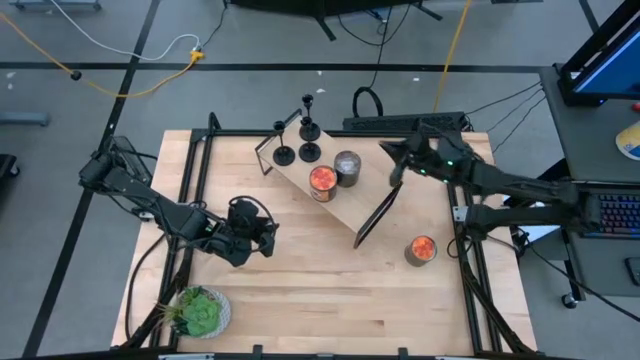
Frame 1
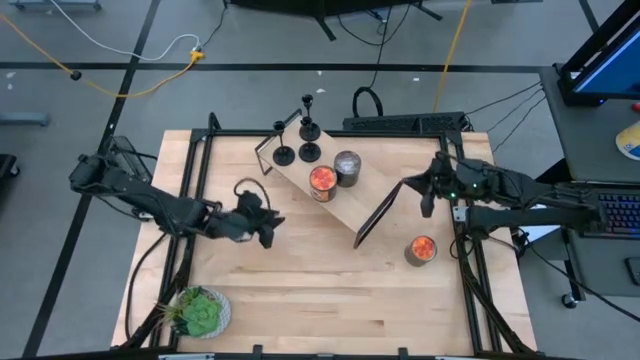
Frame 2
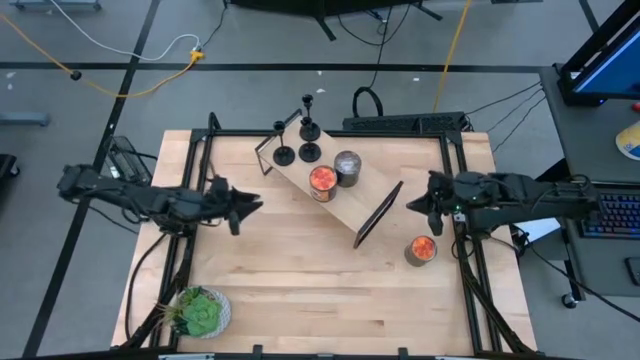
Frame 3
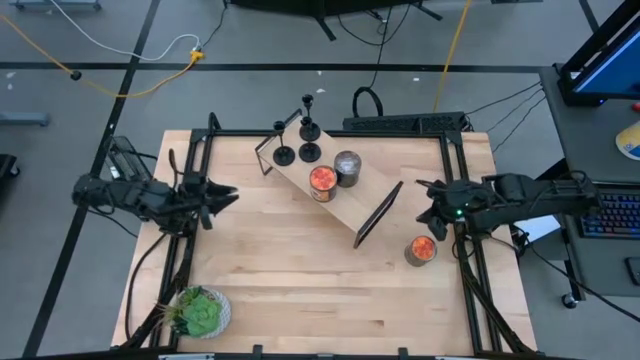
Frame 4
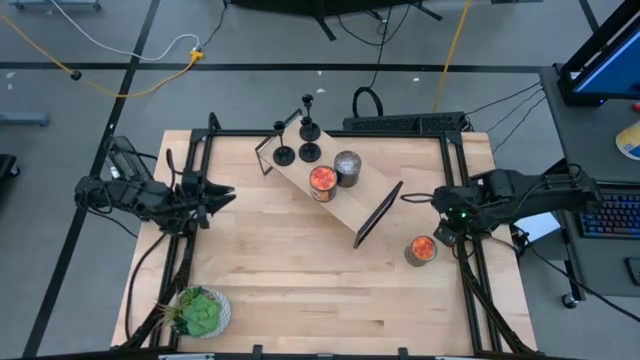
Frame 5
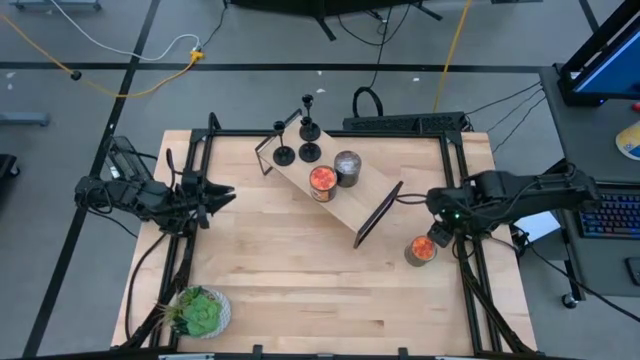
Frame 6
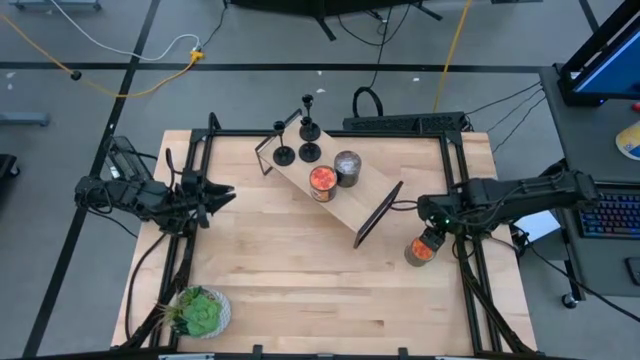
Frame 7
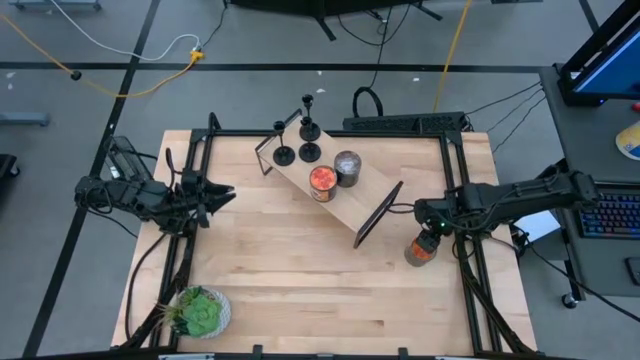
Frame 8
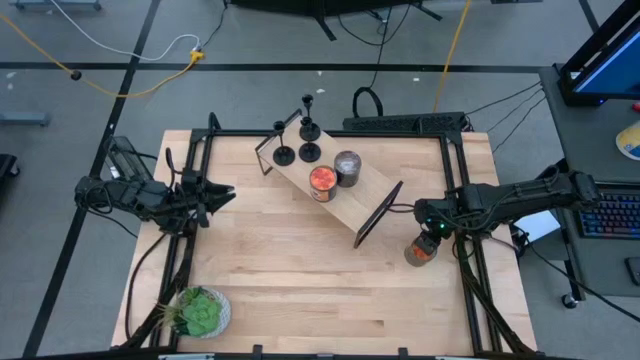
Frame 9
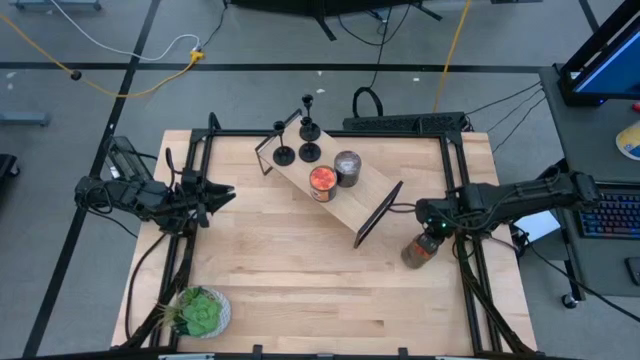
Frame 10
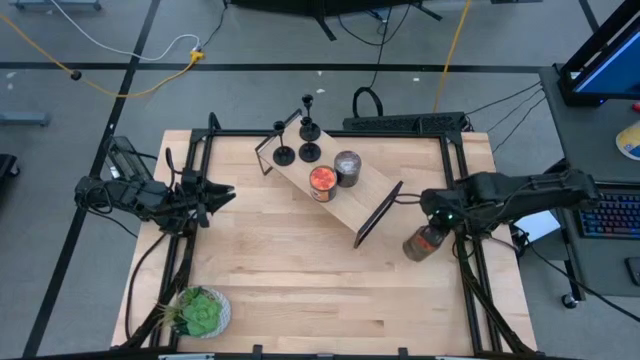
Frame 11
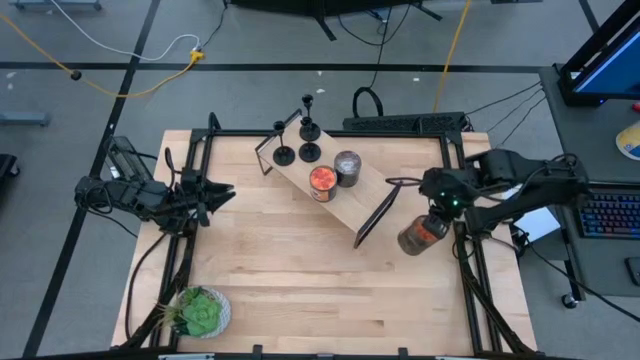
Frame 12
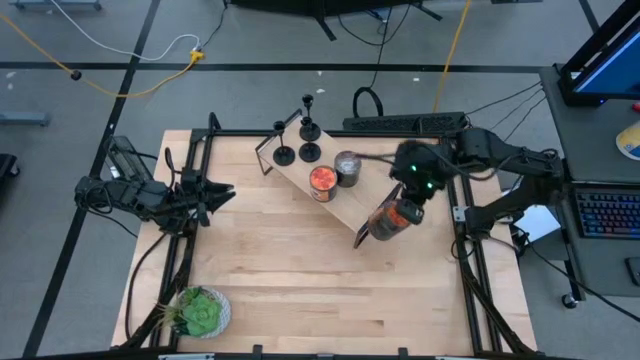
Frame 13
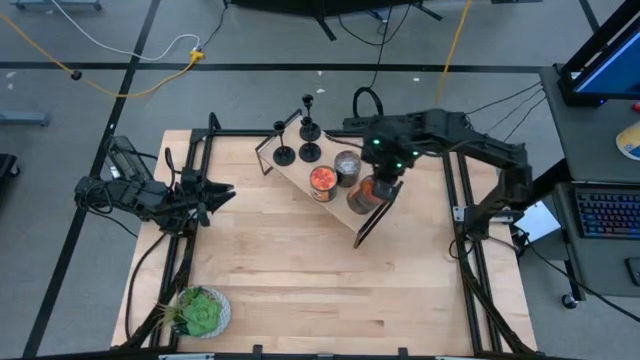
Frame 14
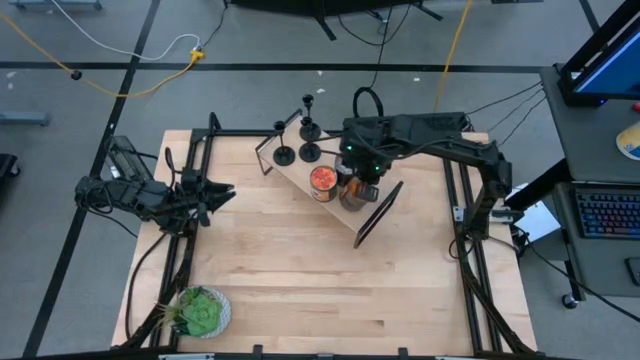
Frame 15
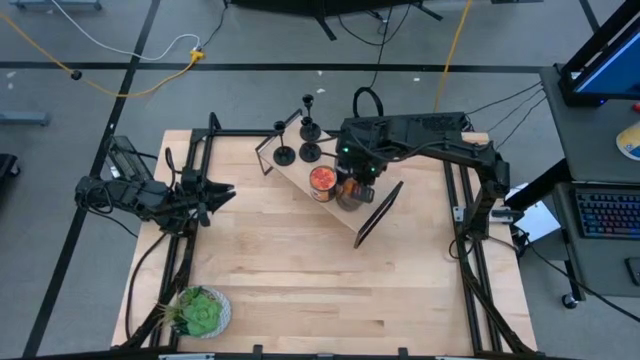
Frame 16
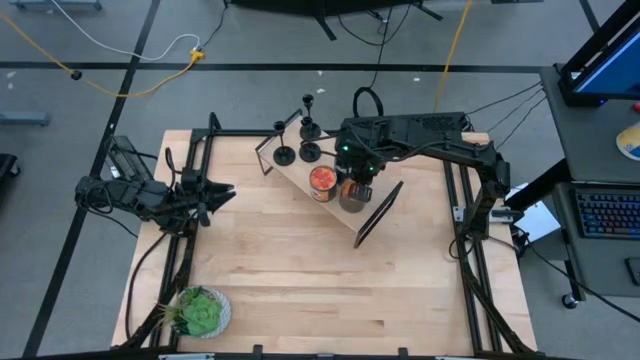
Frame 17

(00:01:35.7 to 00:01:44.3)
Task: Pick & Place candle stick holders
Put the orange scented candle on the shelf

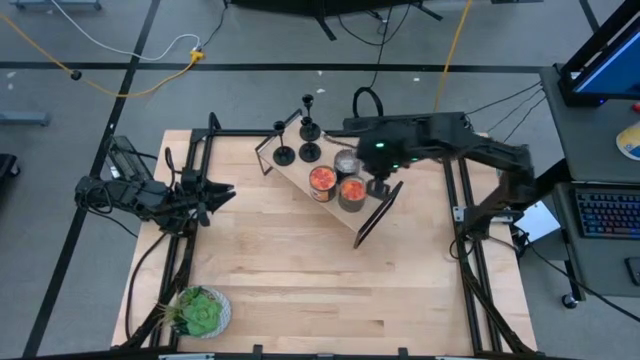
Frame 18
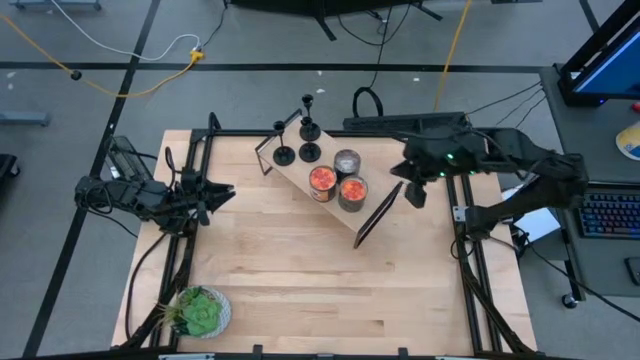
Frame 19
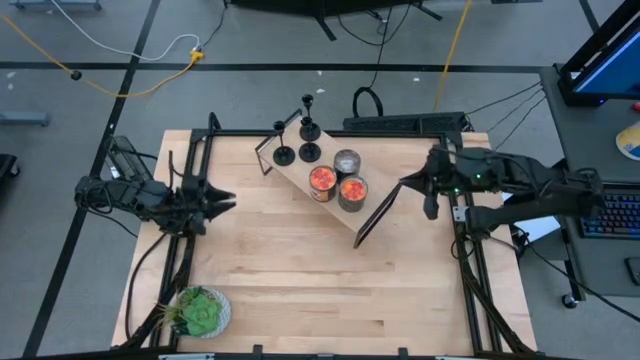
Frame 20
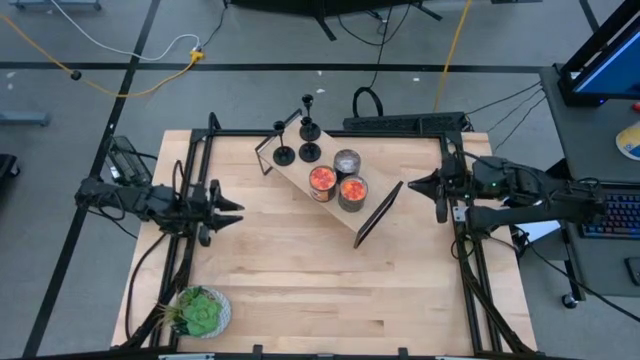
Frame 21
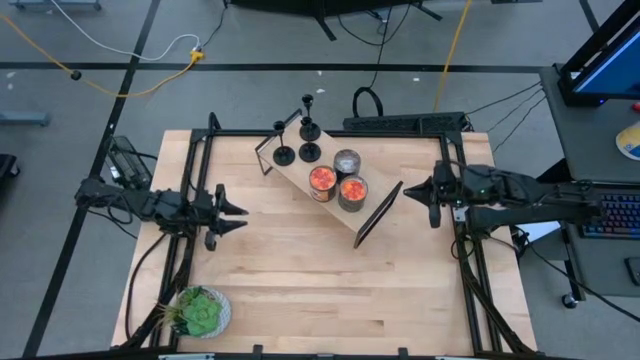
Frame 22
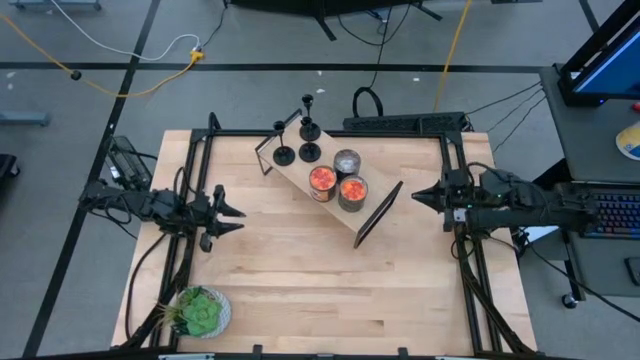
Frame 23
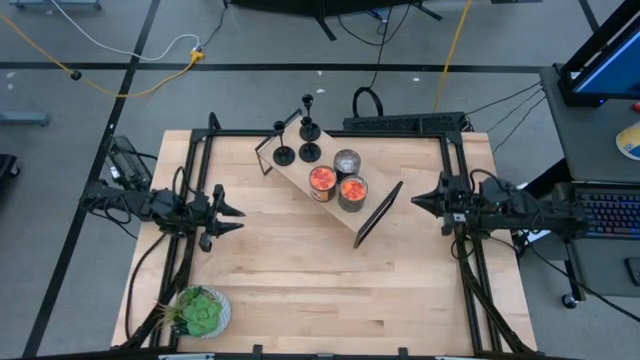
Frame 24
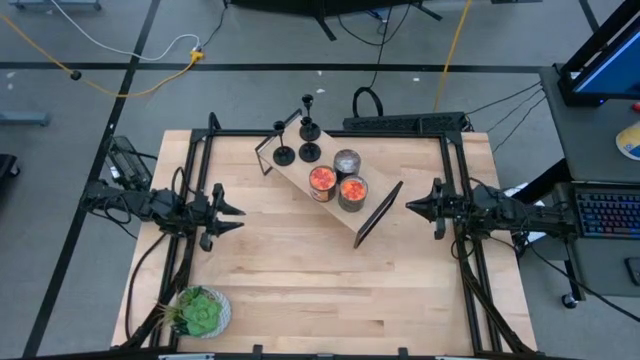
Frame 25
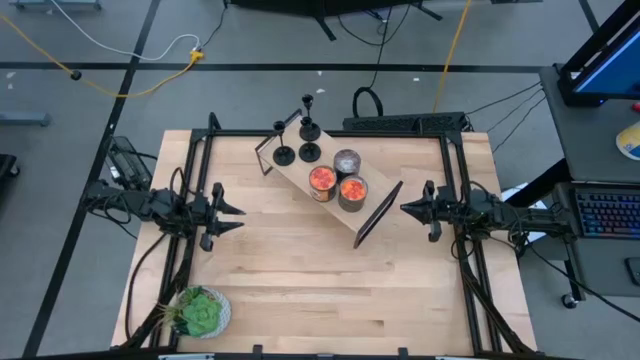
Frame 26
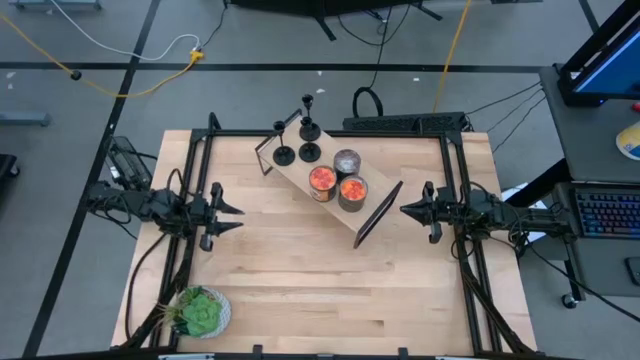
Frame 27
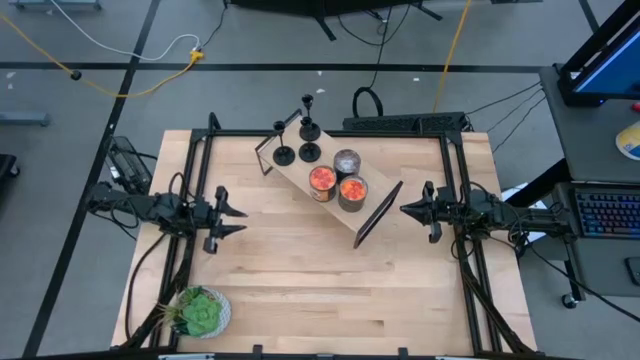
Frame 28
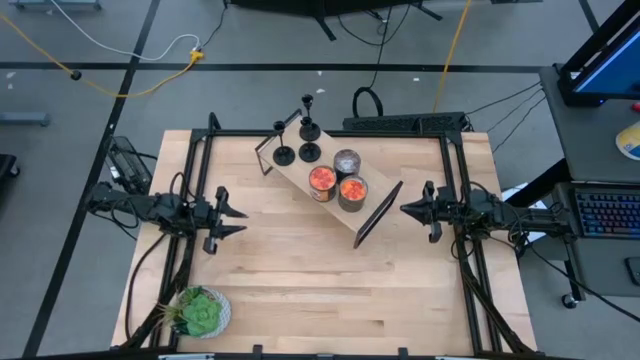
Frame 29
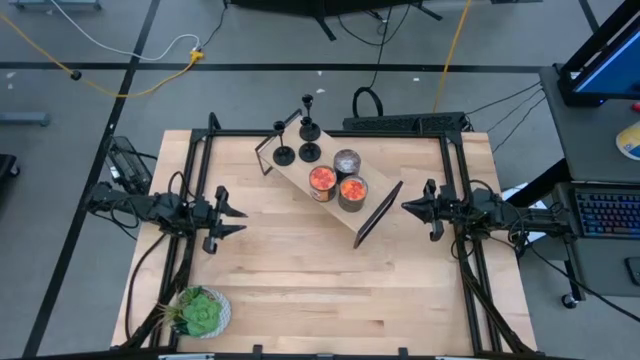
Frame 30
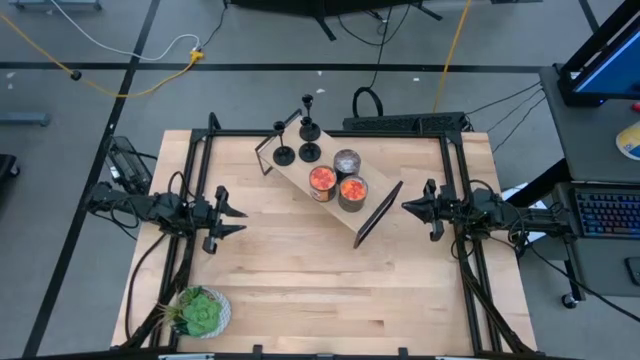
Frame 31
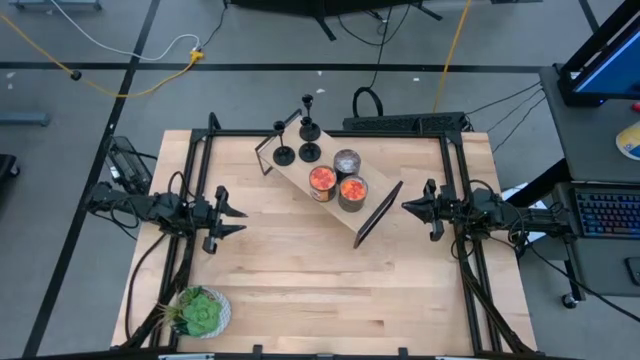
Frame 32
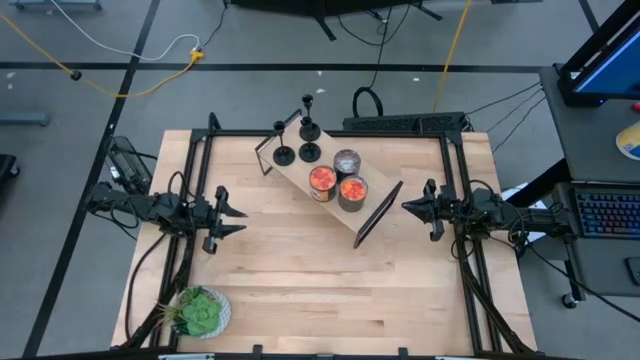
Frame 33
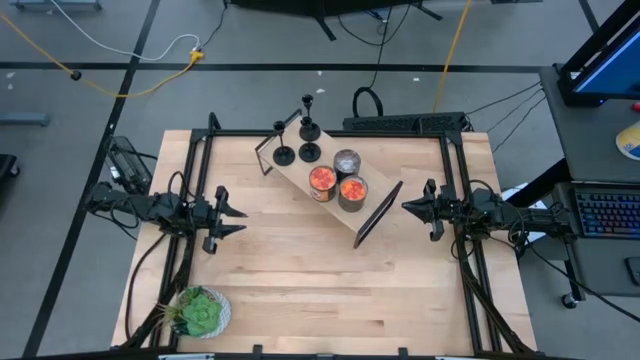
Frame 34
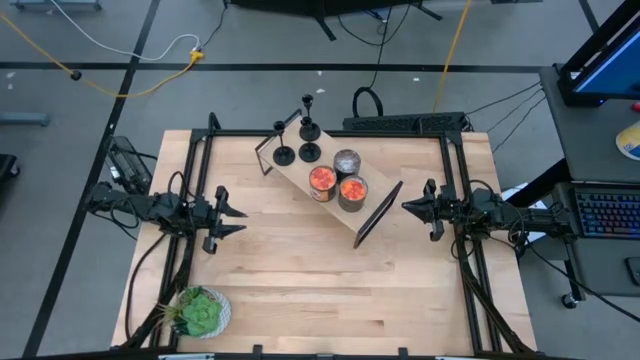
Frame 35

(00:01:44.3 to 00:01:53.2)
Return to Home Position

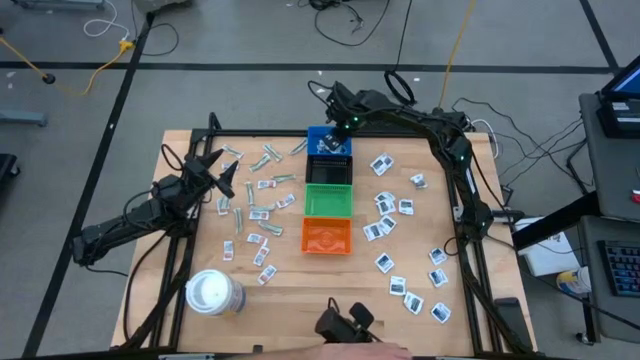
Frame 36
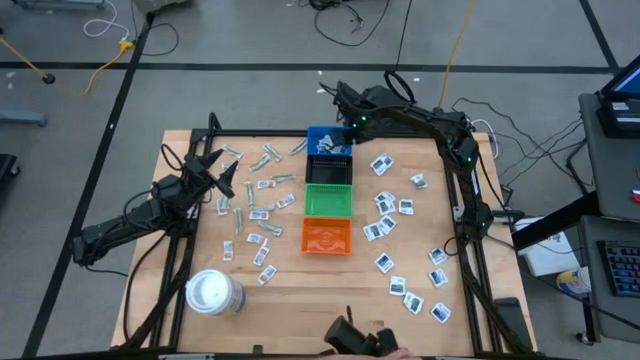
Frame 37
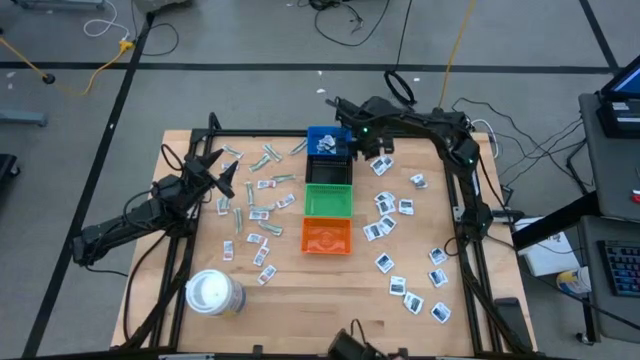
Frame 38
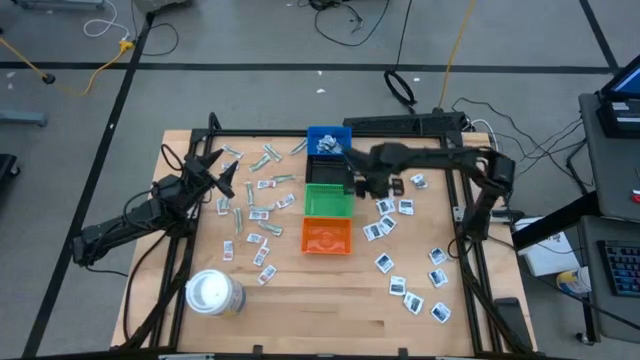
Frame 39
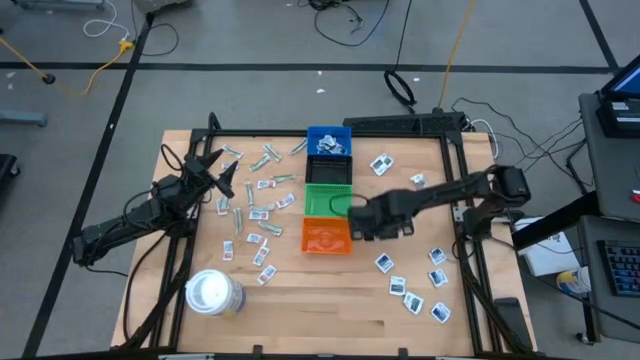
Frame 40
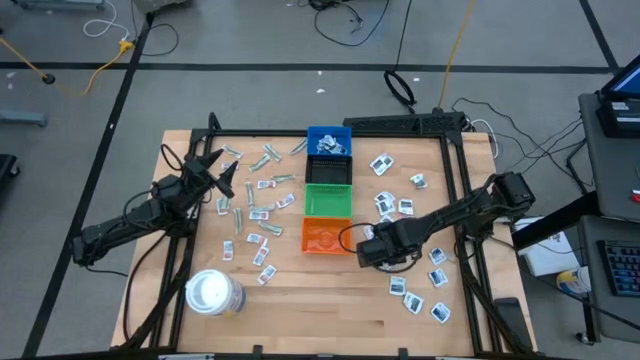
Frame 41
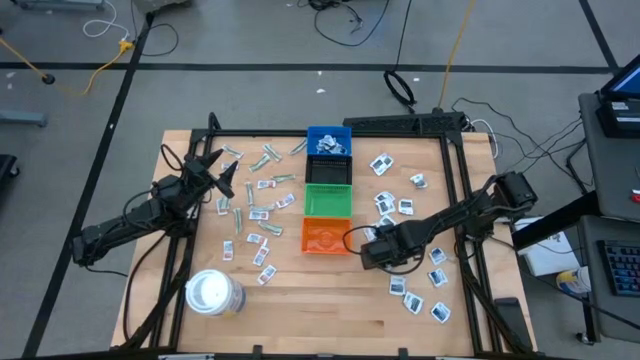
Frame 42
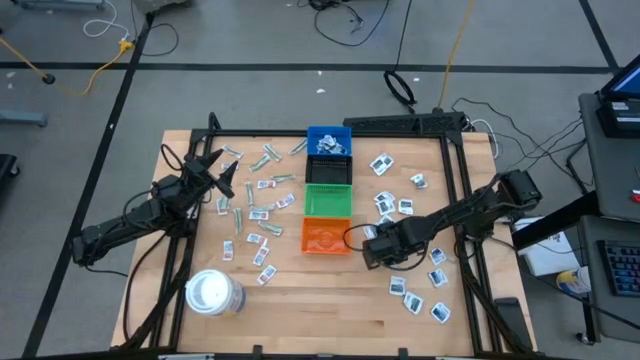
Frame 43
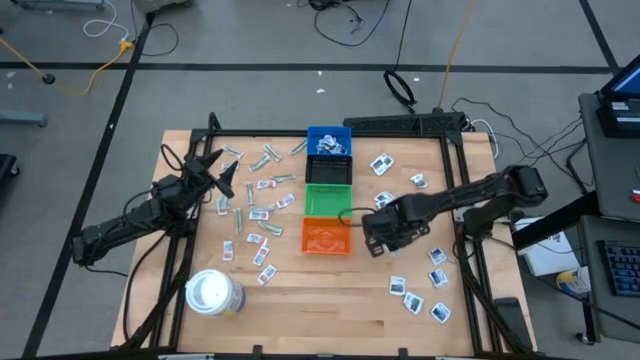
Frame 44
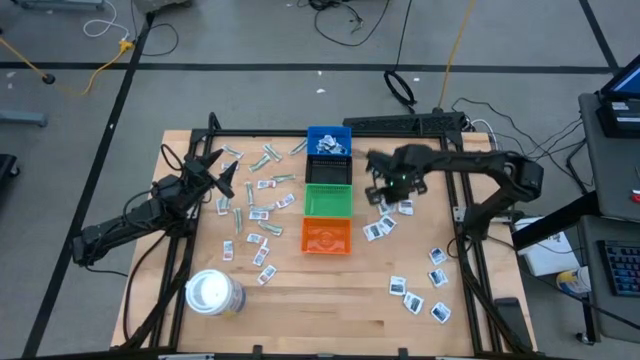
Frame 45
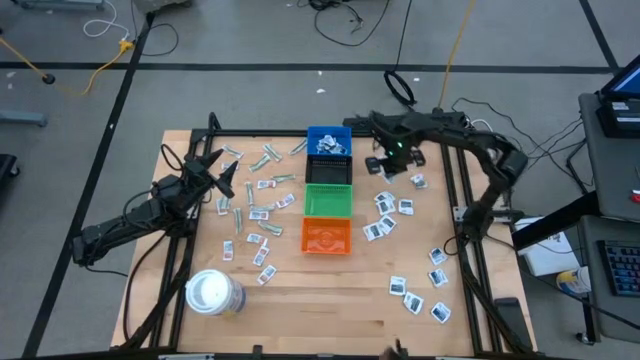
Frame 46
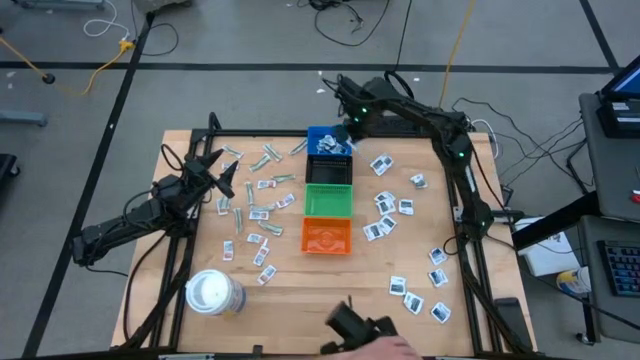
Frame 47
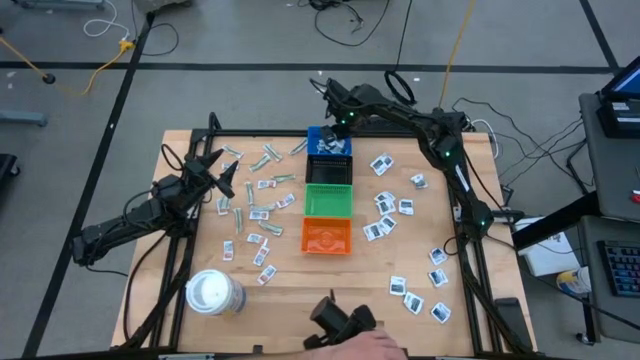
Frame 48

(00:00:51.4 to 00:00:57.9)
Task: Pick & Place First Aid Supplies
Put the blue alcohol pad into the blue bin
